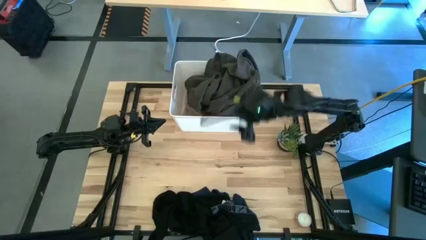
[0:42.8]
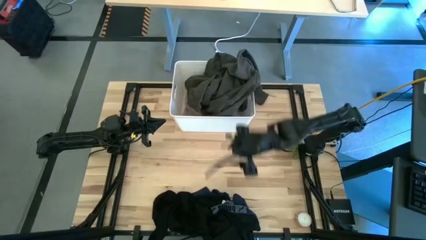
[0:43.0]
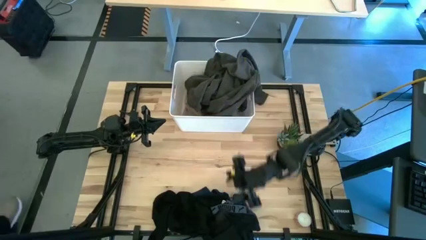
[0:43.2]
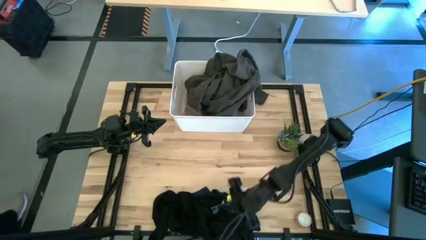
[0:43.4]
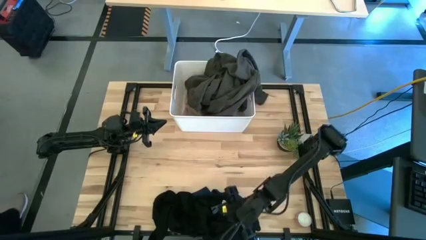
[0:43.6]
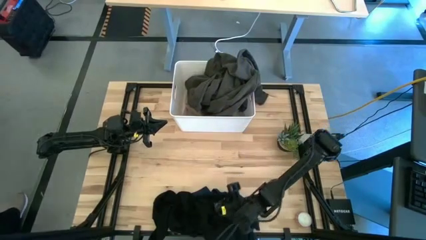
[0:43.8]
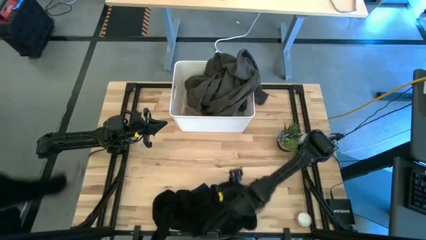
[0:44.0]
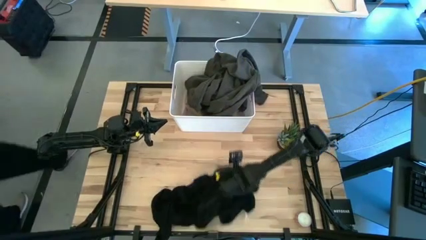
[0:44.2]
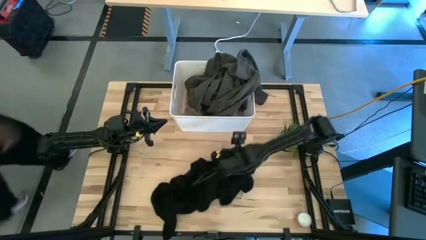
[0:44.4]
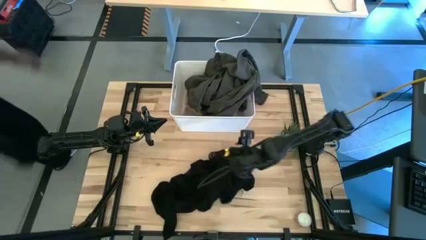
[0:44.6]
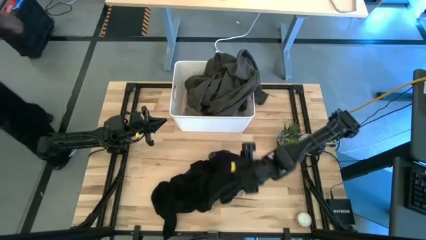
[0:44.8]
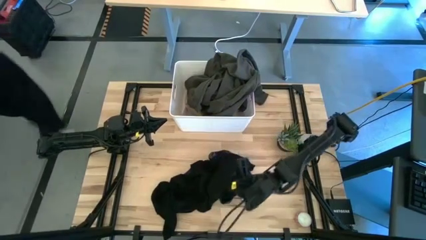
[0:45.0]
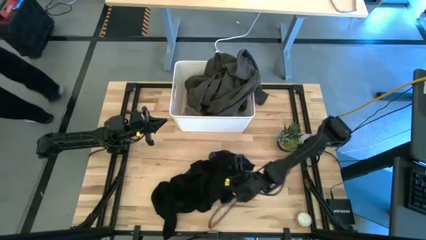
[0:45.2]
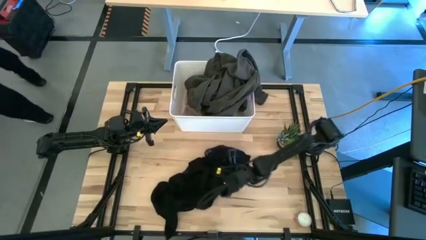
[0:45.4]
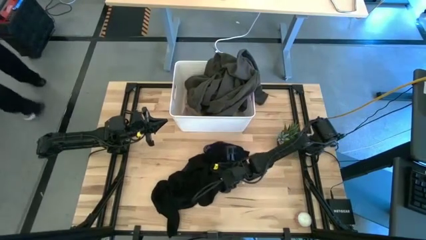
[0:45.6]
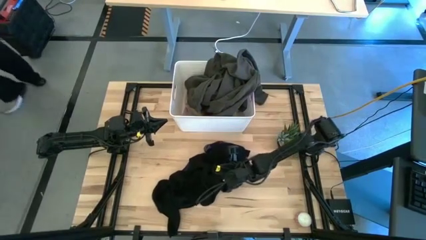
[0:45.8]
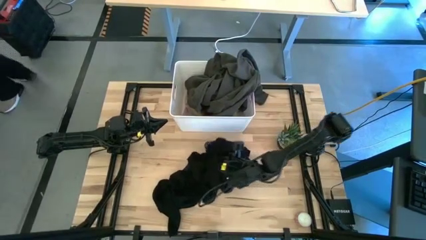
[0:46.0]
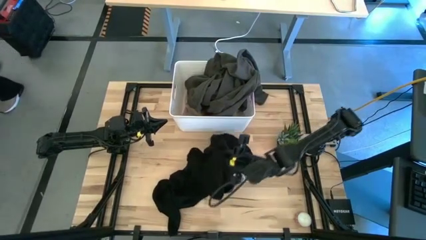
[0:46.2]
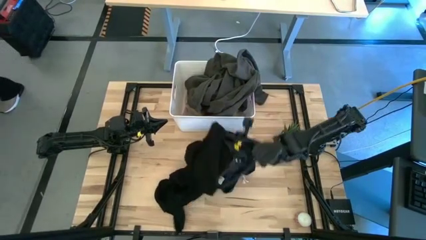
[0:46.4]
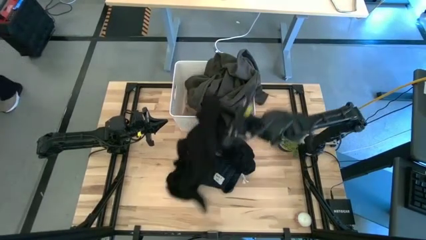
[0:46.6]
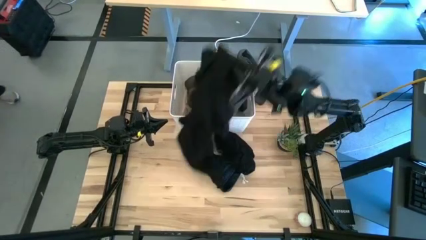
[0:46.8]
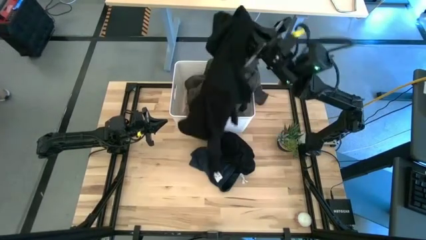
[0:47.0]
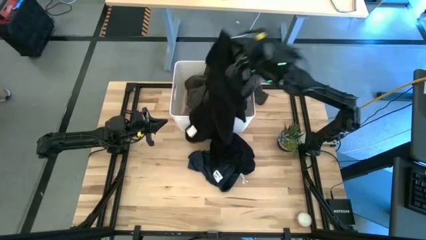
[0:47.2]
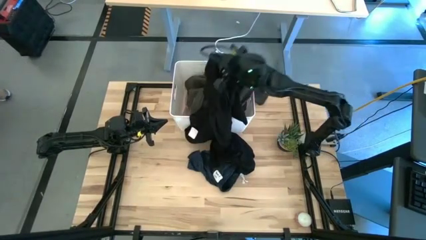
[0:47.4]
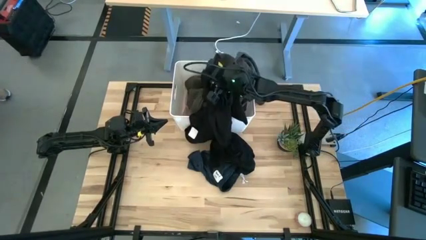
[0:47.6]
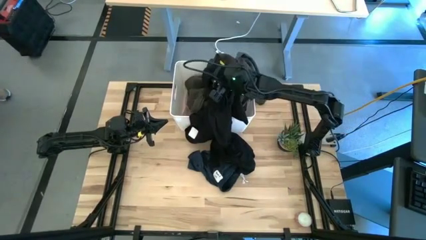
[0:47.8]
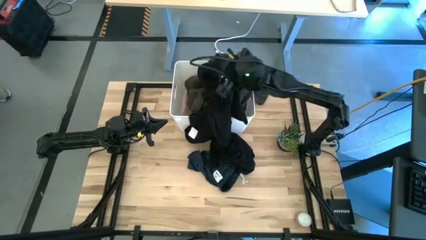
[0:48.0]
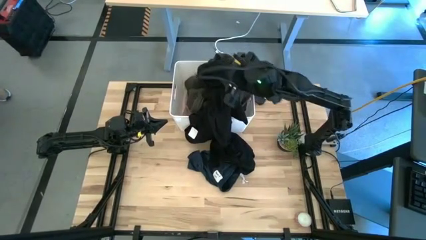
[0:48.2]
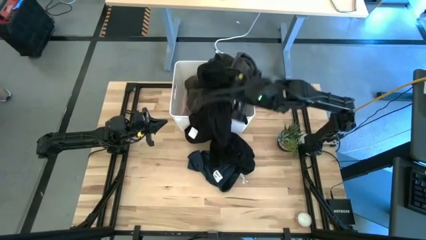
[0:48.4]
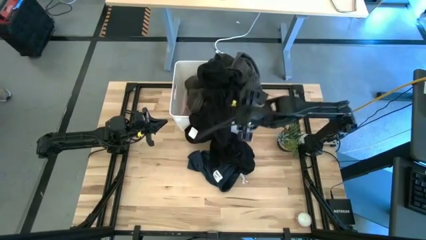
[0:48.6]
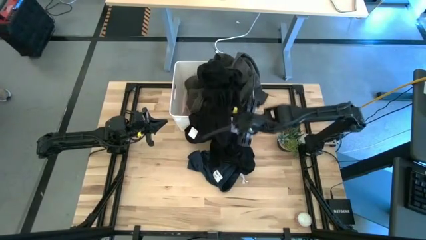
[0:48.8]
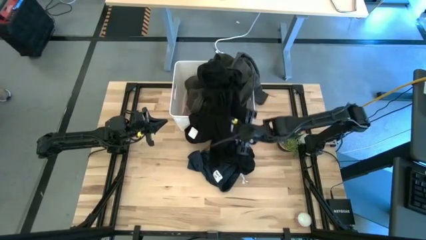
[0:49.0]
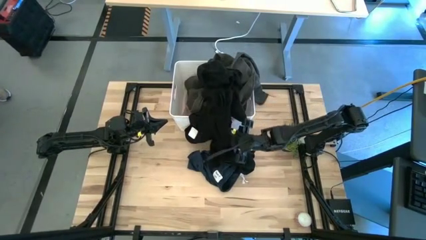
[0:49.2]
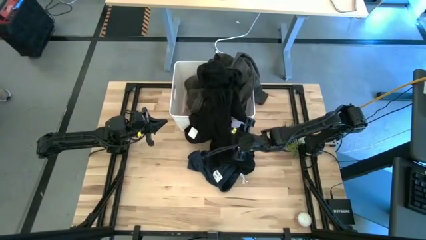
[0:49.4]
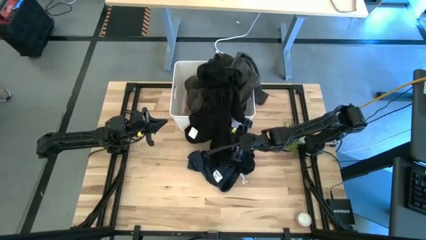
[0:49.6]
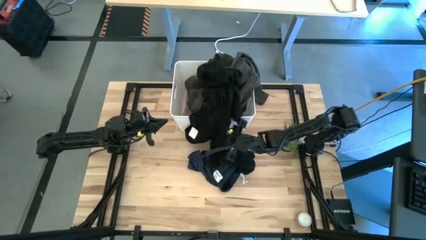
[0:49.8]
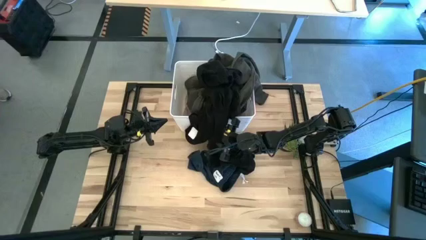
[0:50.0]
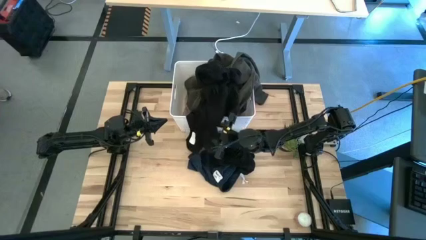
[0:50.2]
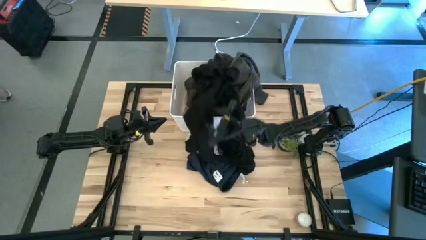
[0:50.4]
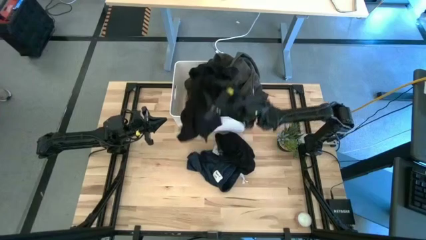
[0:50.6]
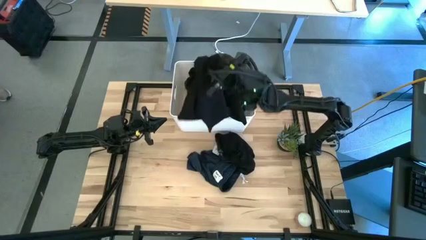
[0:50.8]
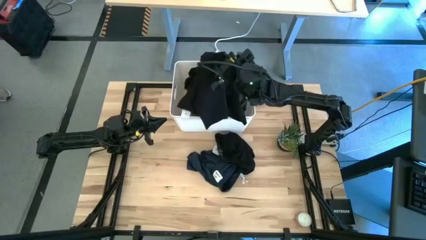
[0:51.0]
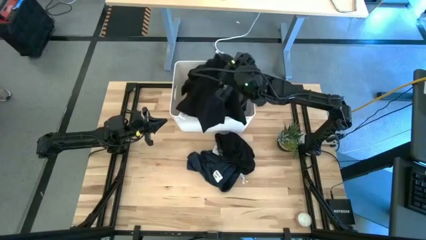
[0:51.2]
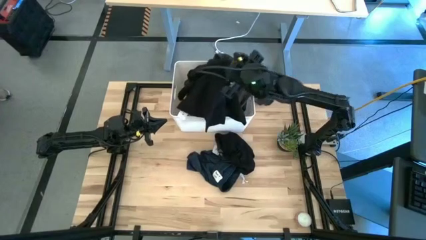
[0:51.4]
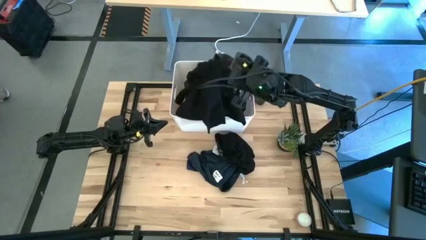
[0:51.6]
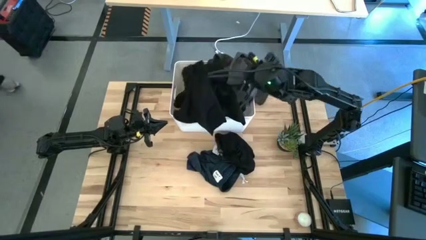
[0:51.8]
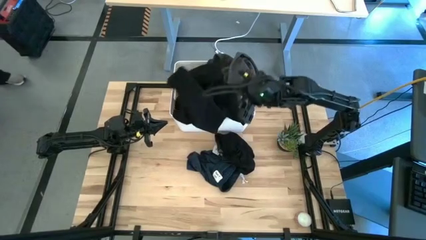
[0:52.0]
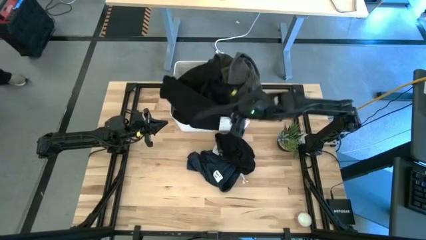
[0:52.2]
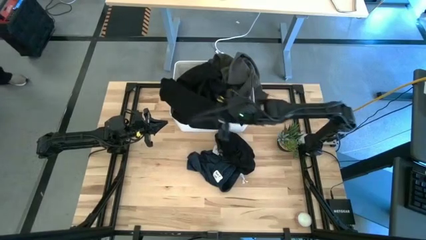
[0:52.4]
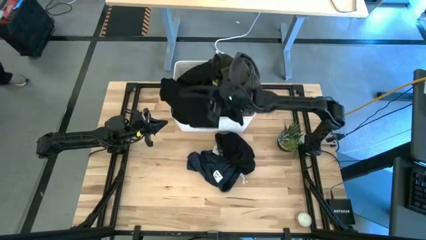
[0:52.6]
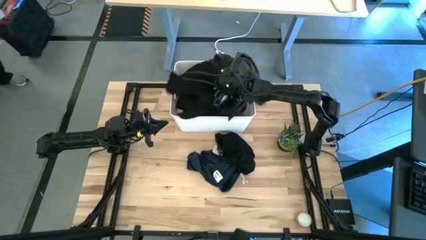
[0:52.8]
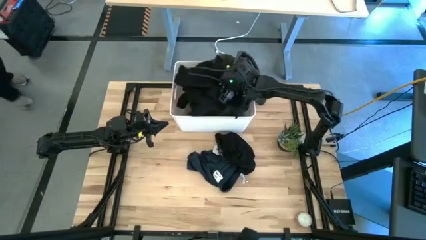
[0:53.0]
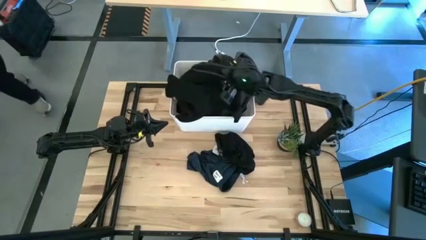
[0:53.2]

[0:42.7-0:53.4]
Task: Sort clothes
Put the black shirt in the white container

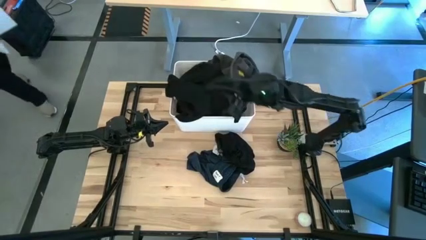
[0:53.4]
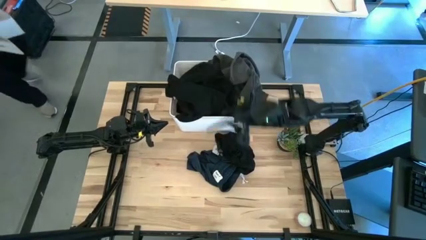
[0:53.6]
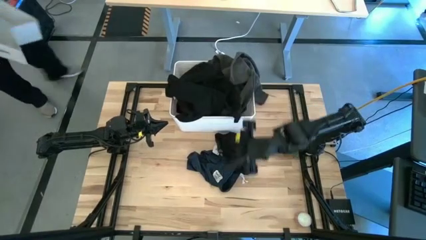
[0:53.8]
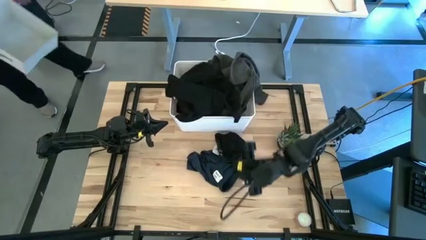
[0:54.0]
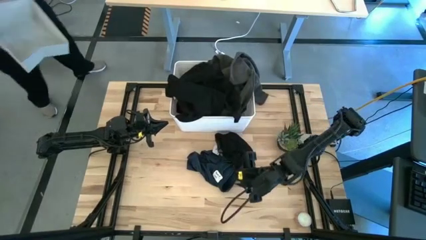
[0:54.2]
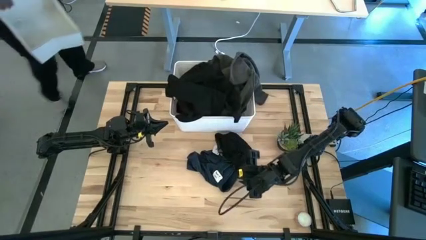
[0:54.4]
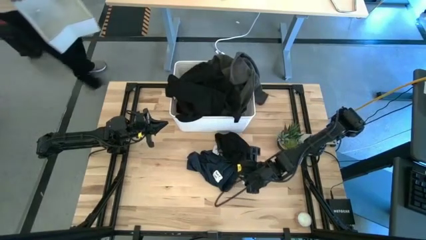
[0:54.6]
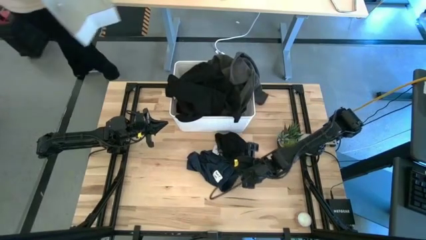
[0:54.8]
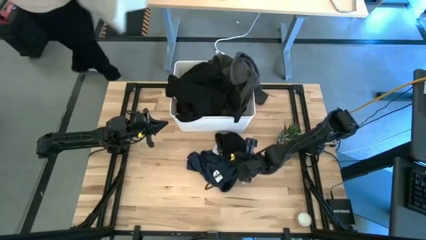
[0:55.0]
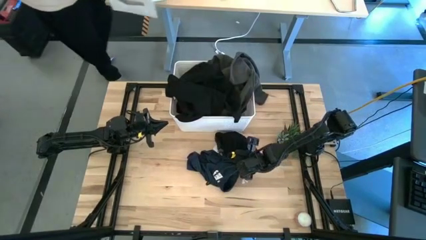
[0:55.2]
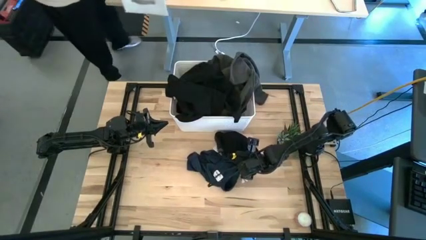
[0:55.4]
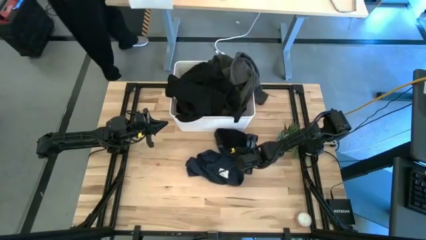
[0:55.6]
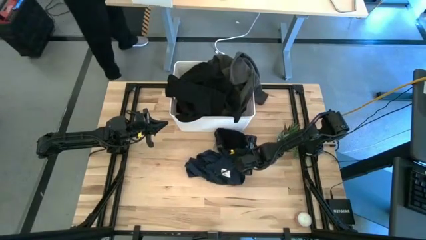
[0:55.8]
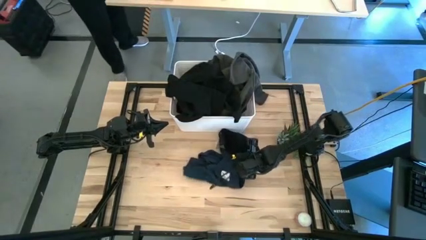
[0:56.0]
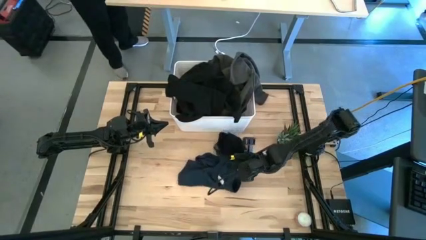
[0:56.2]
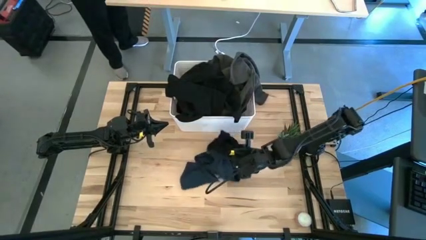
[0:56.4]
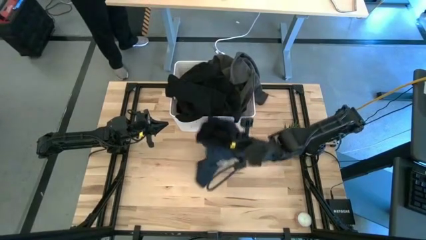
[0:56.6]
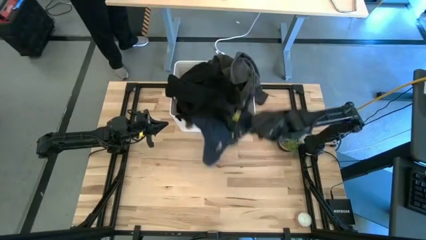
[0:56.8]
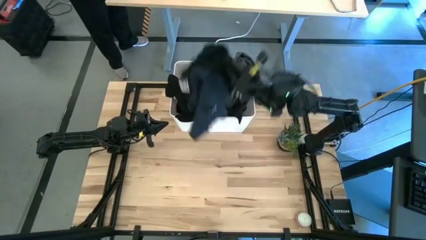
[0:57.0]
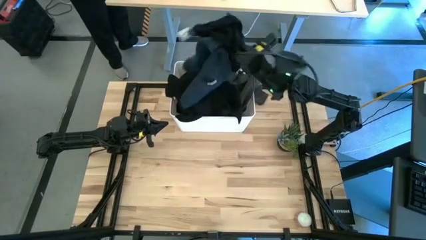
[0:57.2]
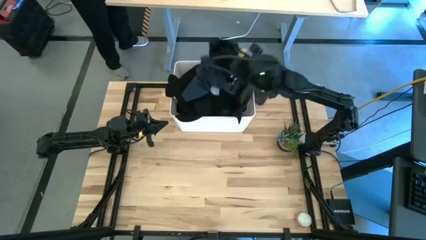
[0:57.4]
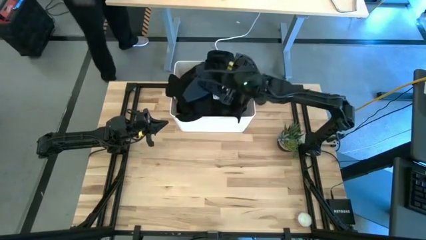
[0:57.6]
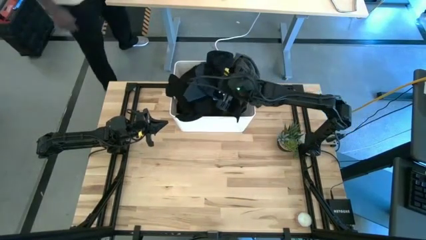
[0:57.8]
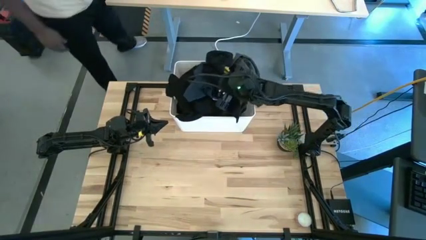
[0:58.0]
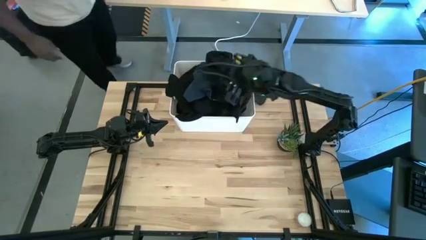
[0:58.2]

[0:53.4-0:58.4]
Put the dark blue shorts and black underwear in the white container
